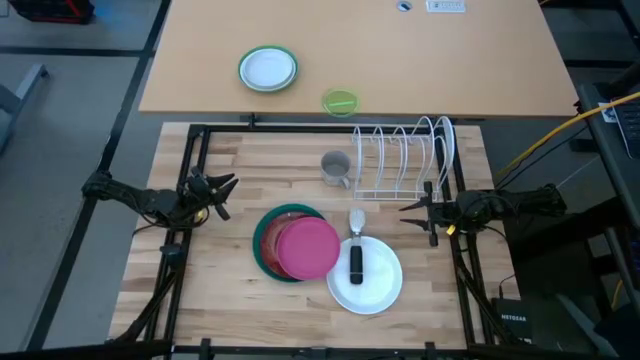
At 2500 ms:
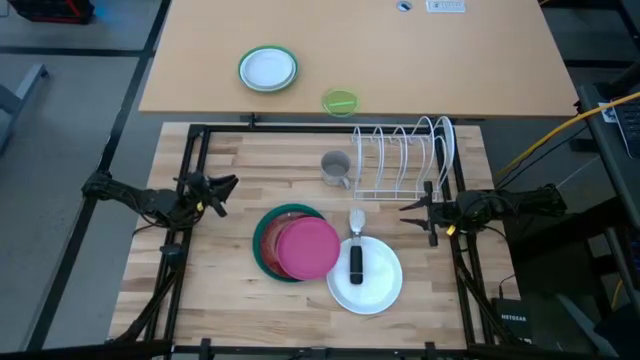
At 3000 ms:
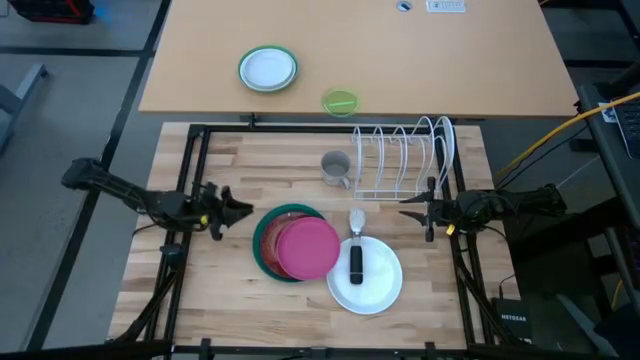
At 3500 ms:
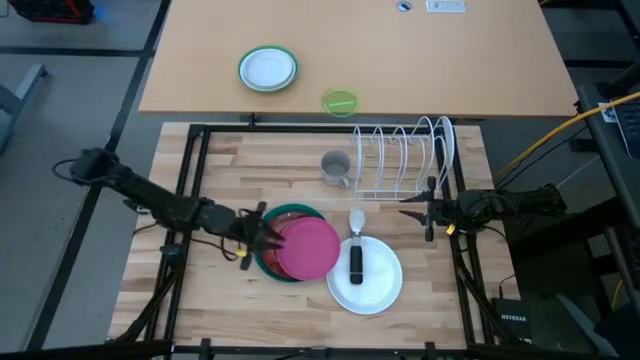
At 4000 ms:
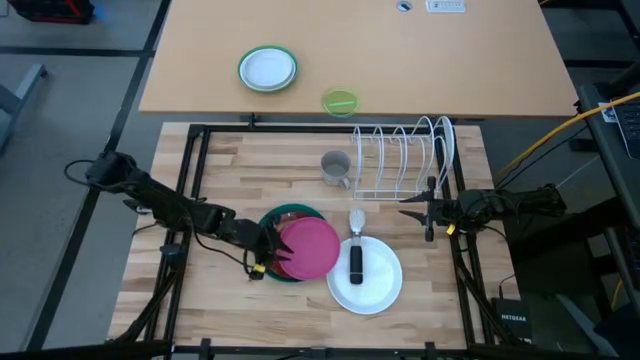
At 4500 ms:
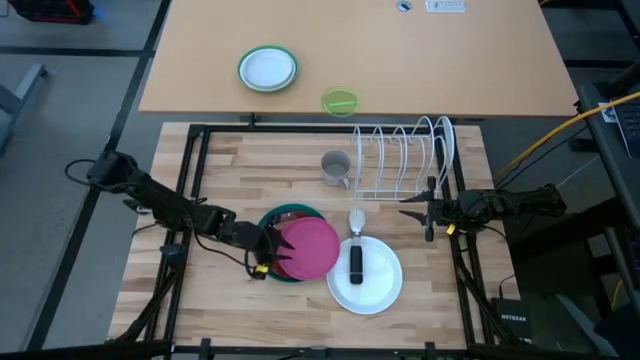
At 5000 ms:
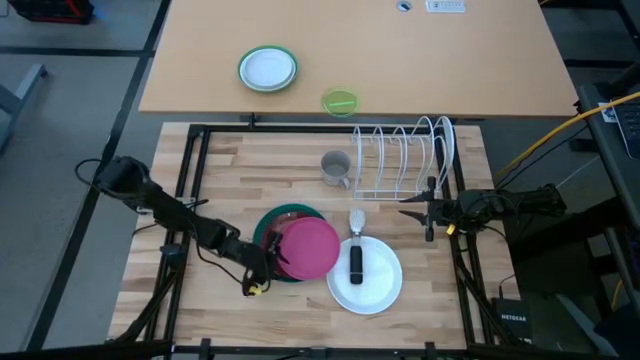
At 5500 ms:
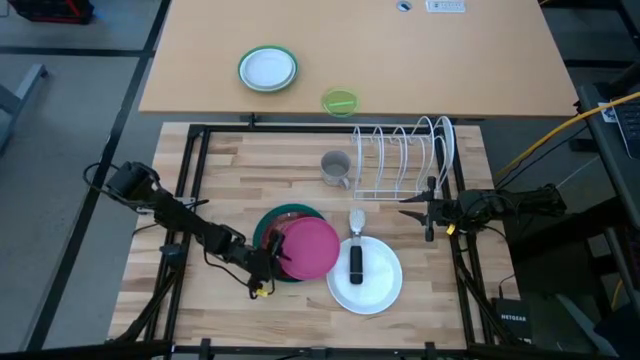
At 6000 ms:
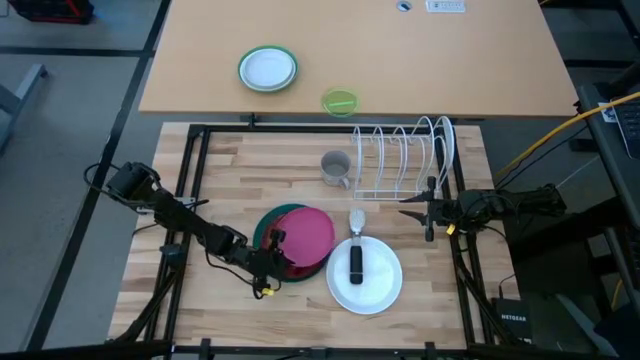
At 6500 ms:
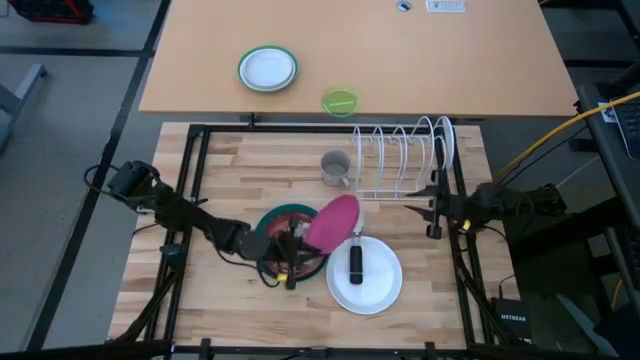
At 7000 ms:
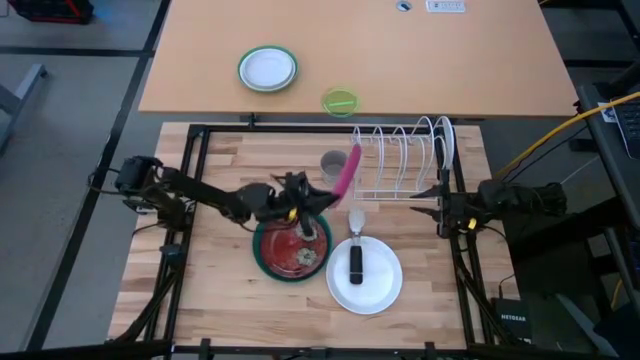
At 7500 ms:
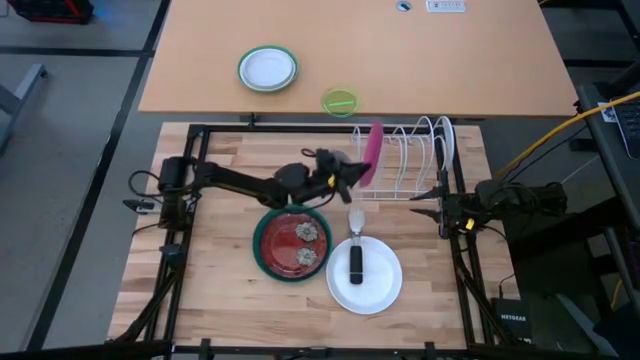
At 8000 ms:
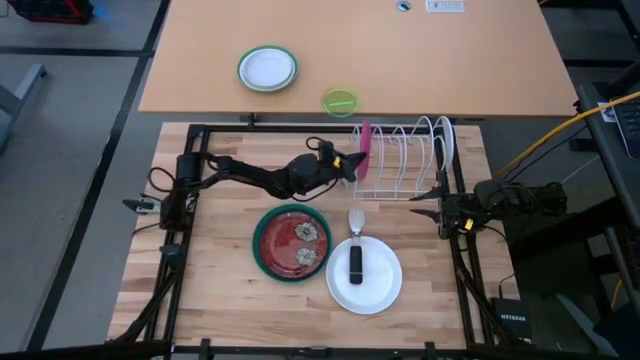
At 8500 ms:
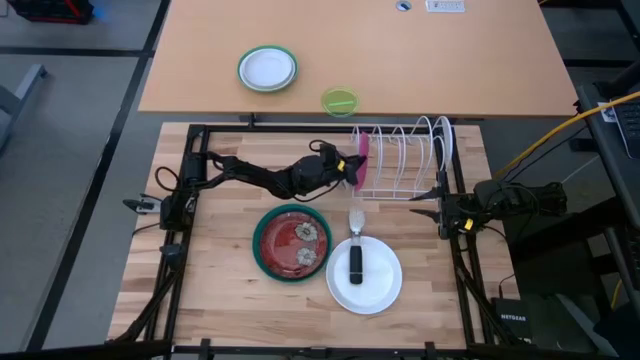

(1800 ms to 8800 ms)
Task: Sort dishes
Put the pink plate in the white dish rack

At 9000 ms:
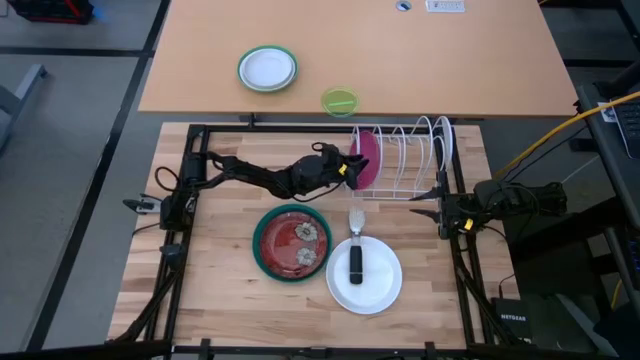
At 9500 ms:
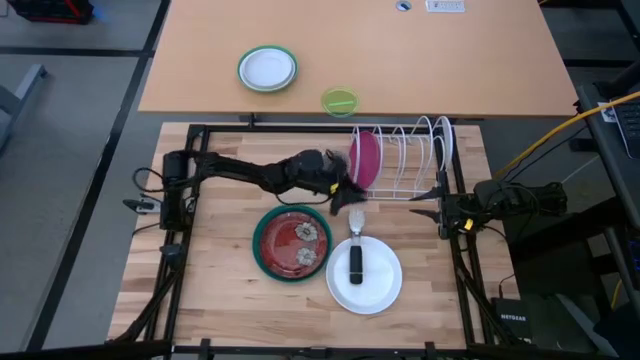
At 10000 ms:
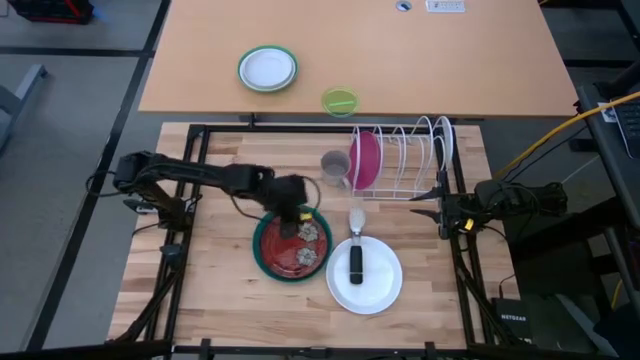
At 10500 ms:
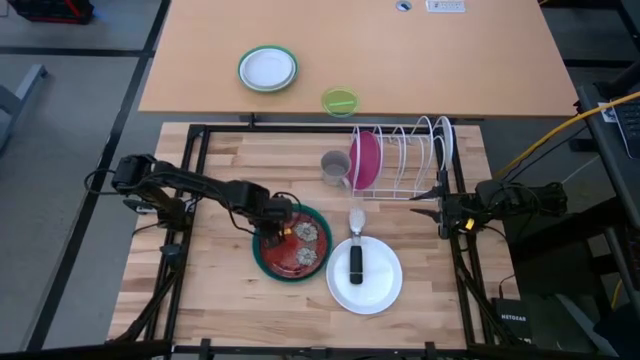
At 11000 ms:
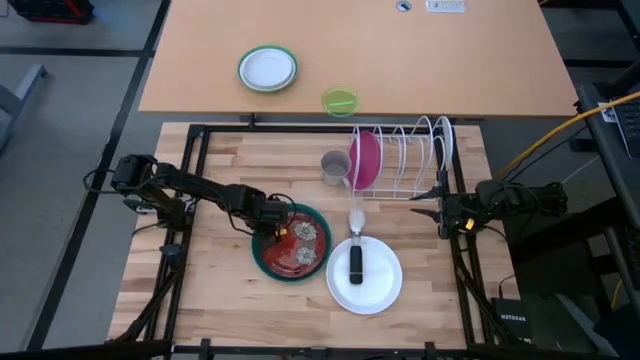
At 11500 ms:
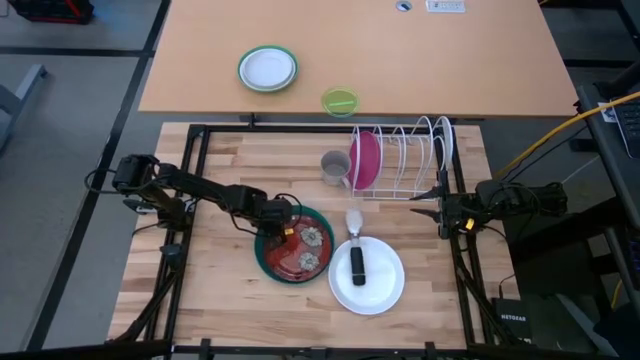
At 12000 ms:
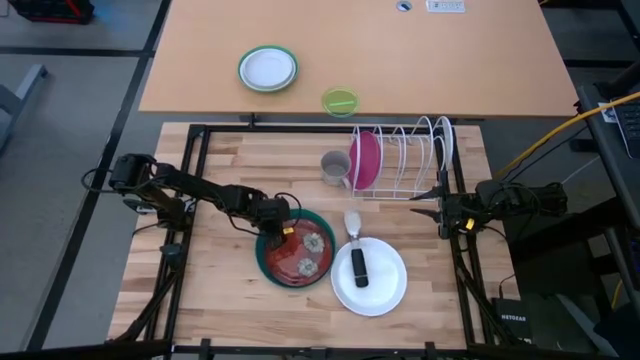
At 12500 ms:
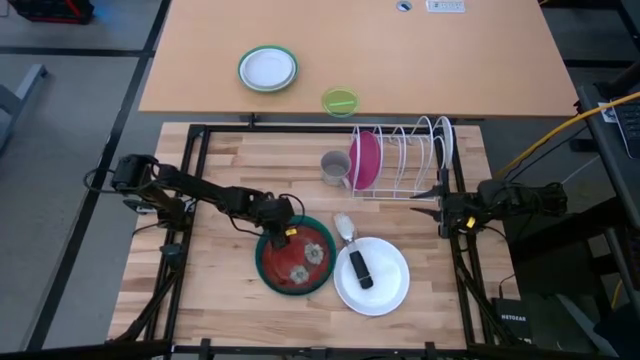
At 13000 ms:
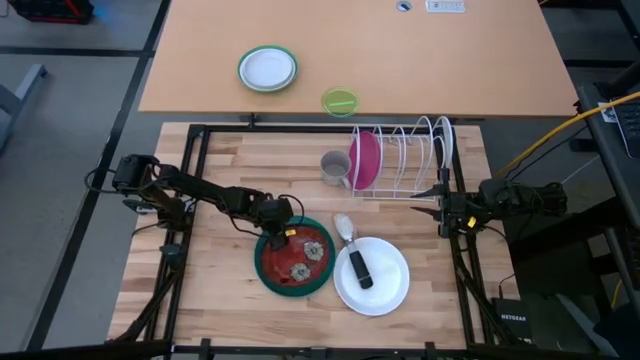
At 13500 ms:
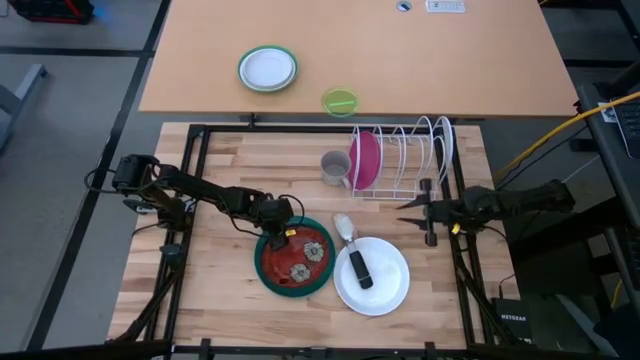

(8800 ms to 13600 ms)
Put the brown plate in the white dish rack

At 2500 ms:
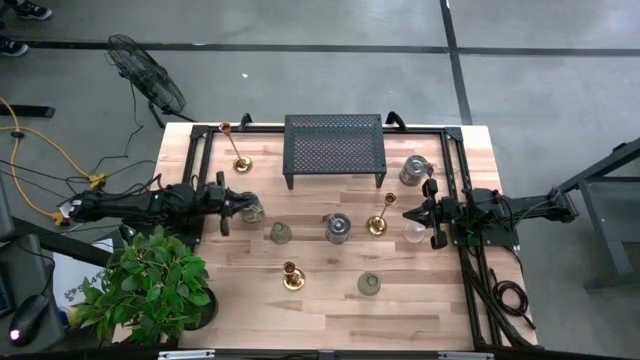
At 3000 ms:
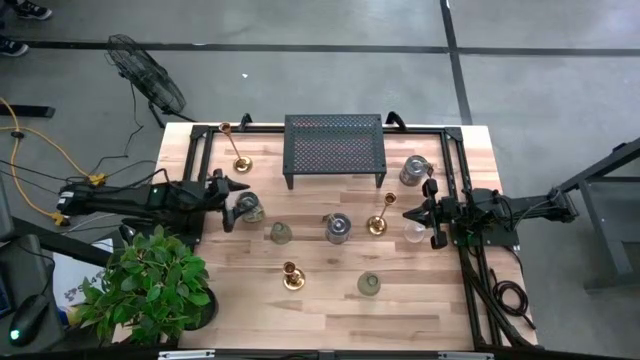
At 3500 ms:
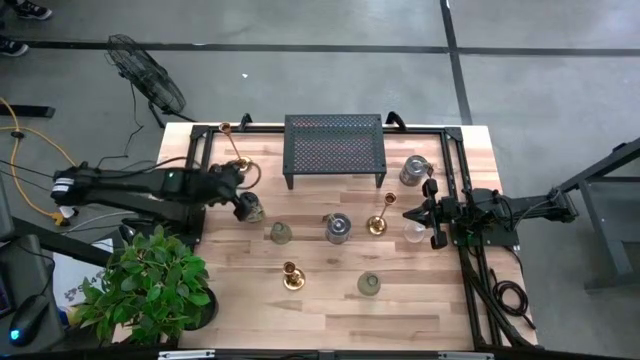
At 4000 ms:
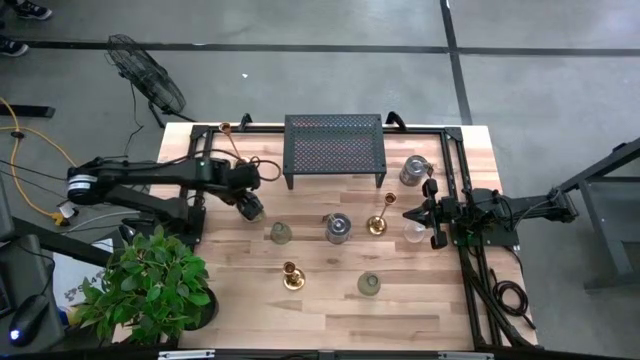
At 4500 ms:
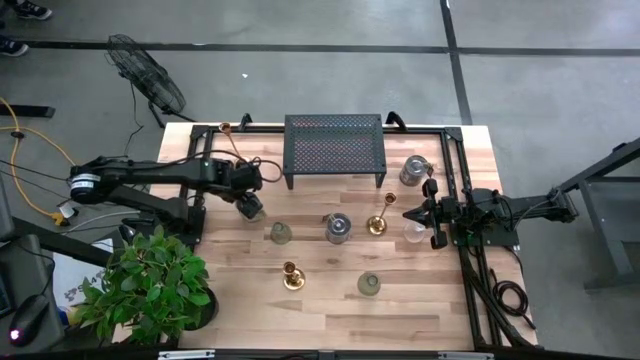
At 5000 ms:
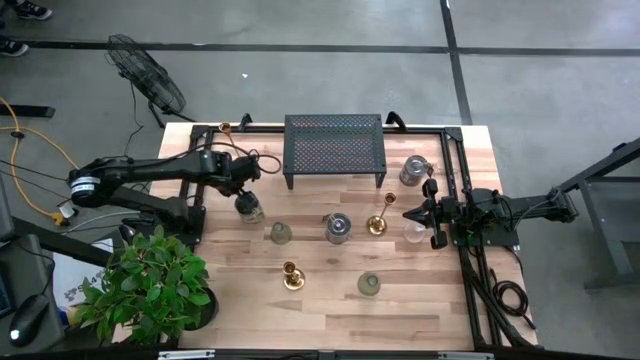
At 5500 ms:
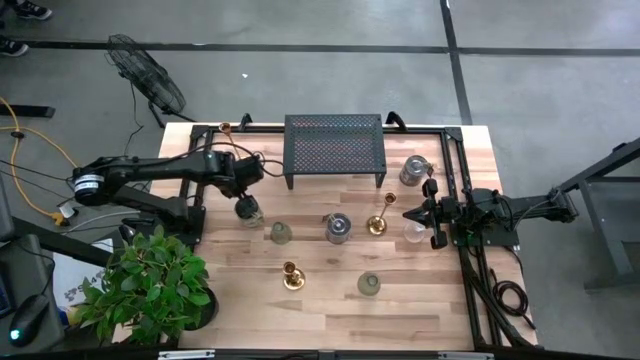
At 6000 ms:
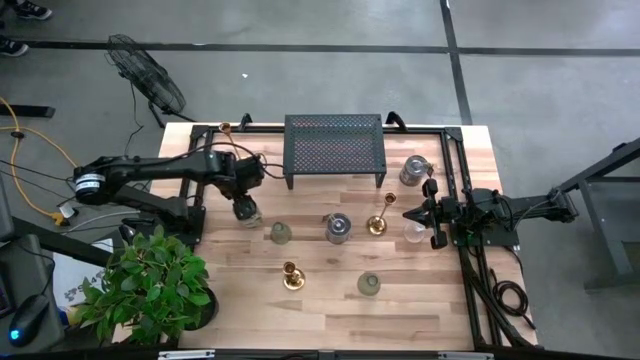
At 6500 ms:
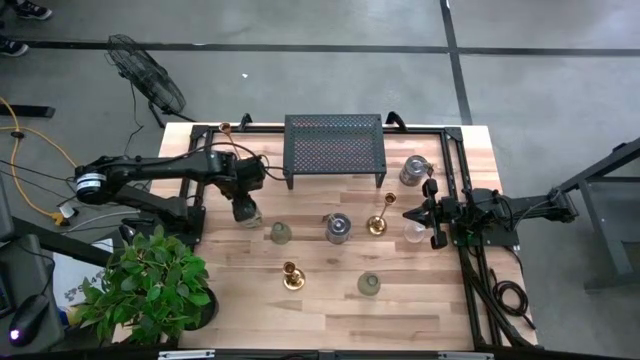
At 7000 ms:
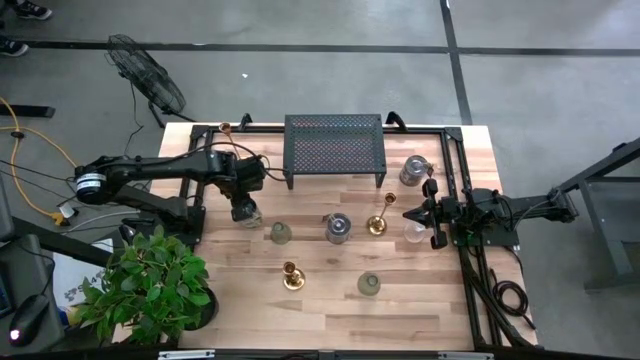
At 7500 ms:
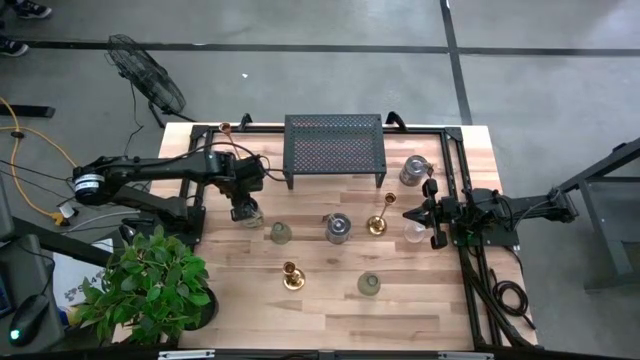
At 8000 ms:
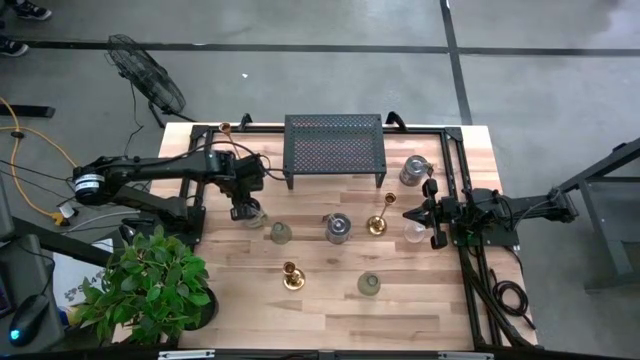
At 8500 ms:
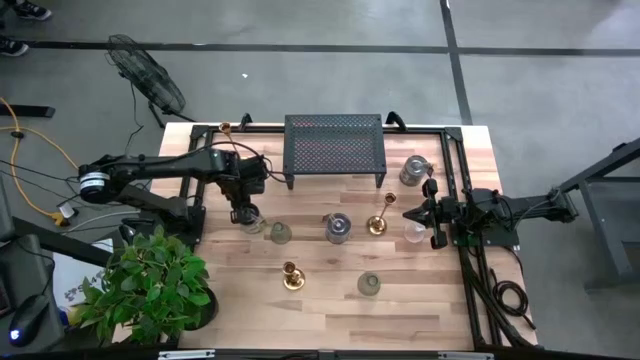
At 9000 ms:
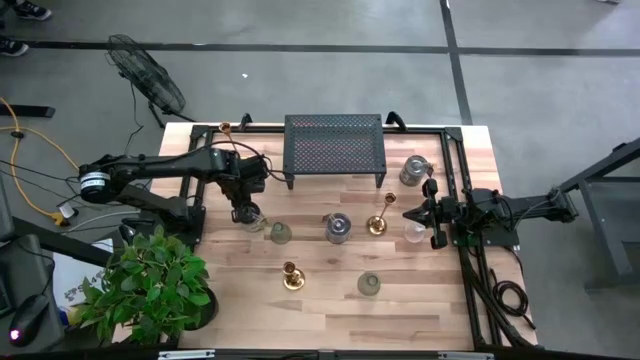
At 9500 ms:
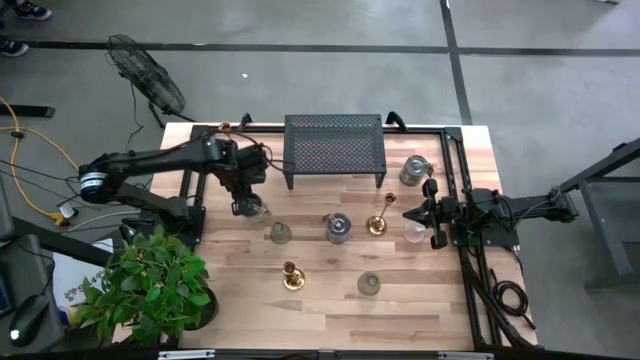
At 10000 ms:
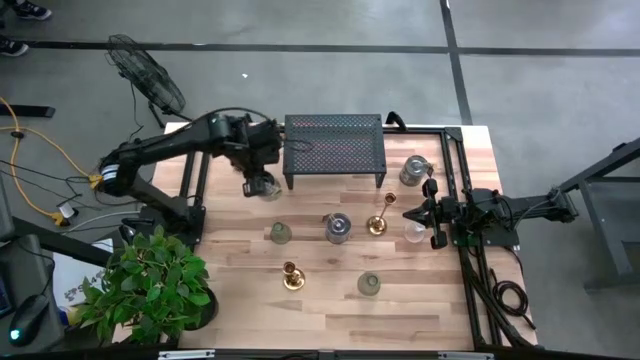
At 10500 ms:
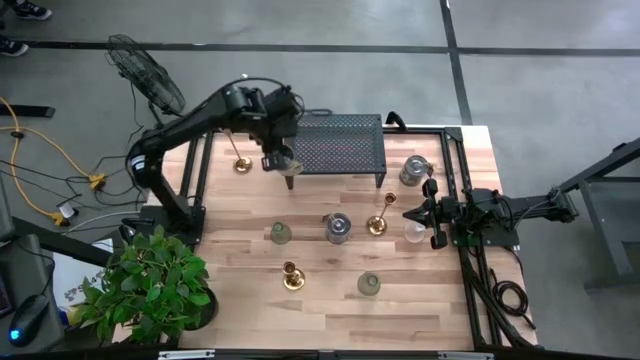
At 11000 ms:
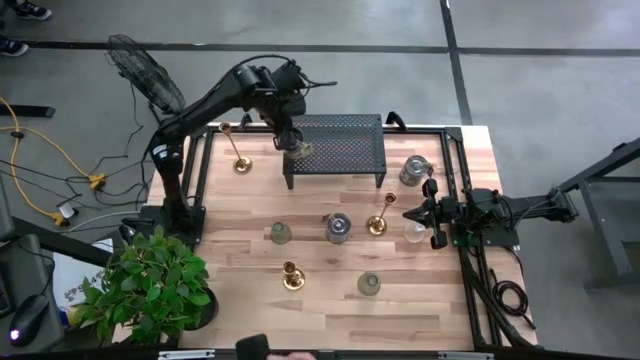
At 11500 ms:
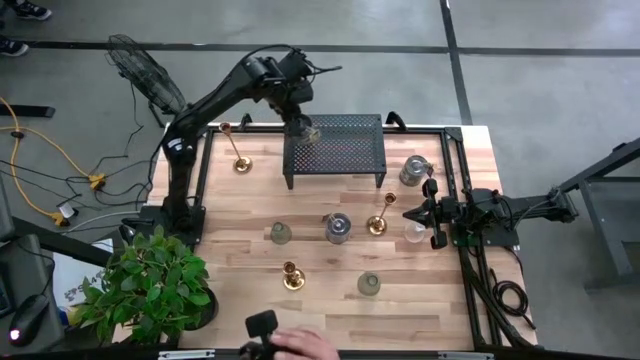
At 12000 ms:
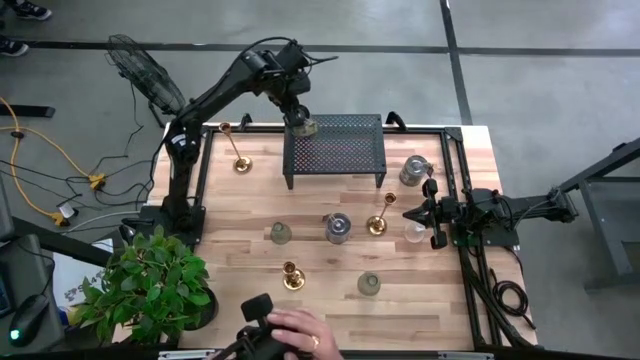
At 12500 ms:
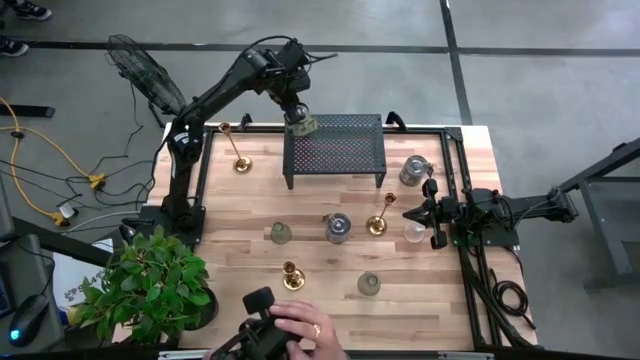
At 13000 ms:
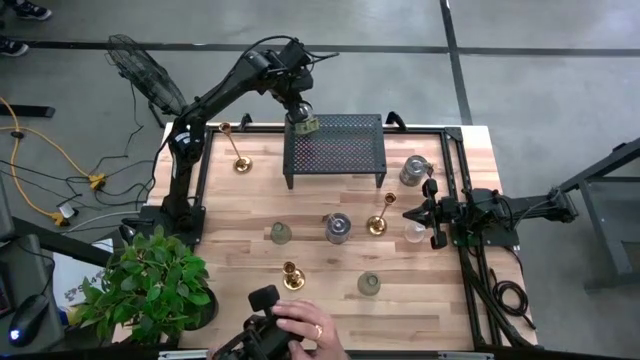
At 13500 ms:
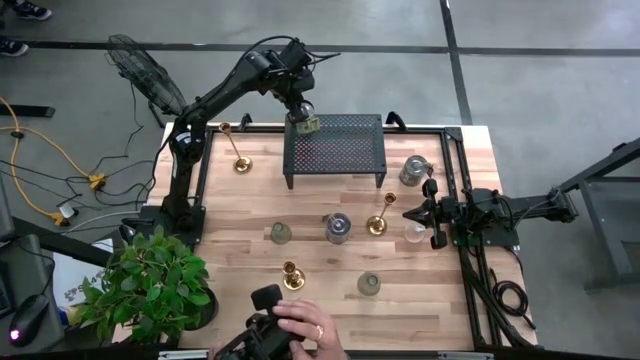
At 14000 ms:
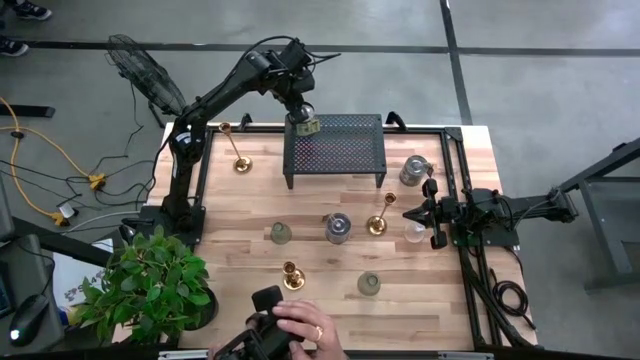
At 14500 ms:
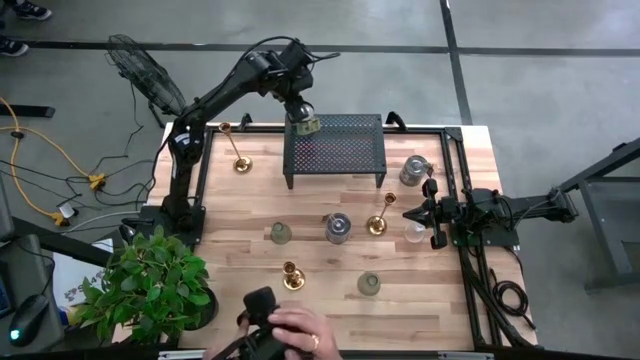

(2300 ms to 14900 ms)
Task: Stock candles on shelf
Put the bottom left silver scented candle on the shelf
